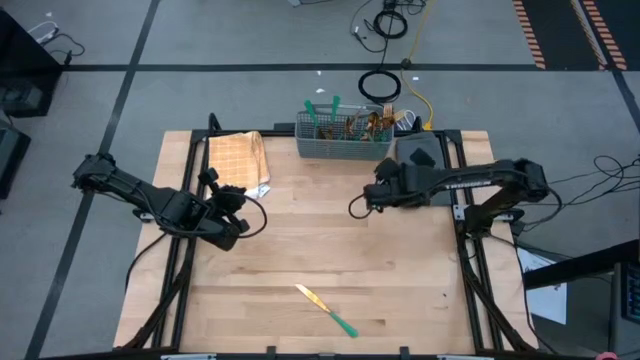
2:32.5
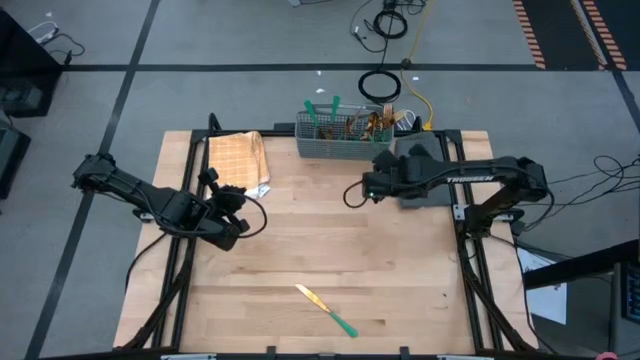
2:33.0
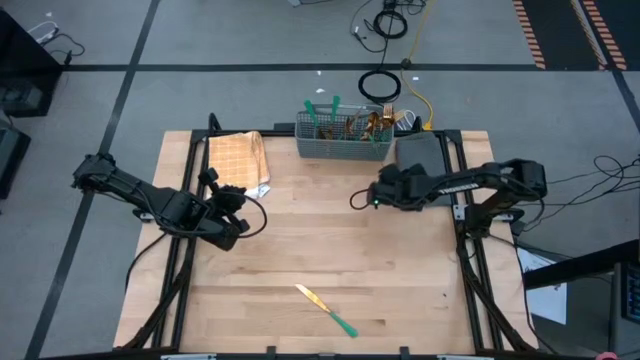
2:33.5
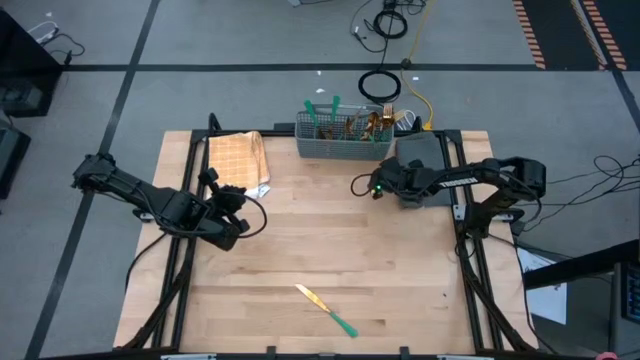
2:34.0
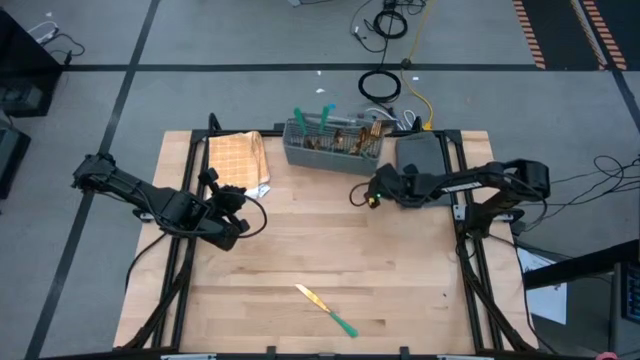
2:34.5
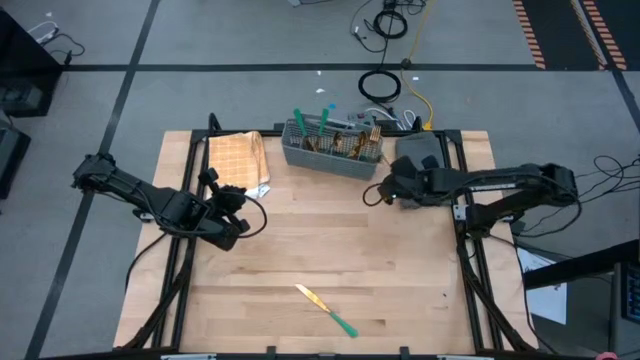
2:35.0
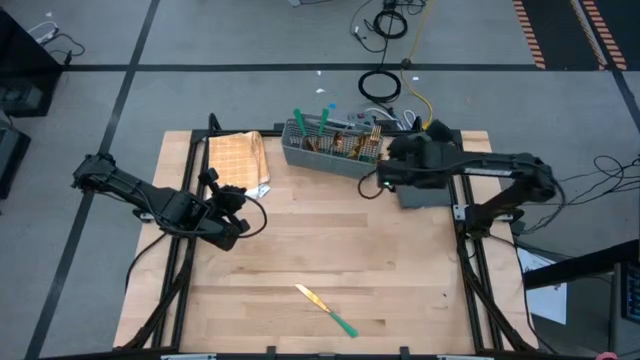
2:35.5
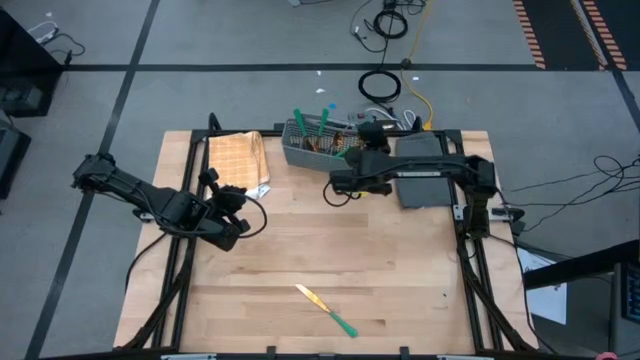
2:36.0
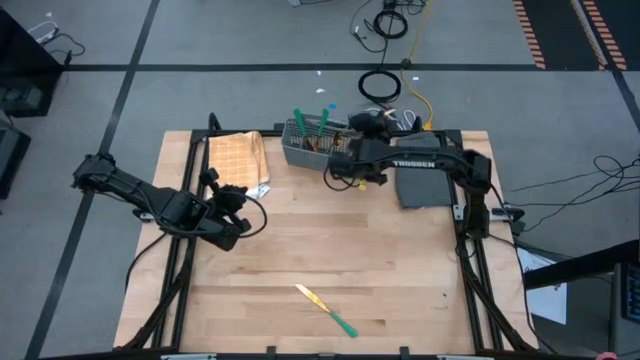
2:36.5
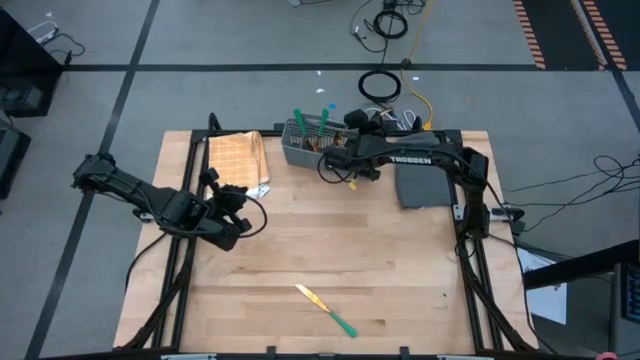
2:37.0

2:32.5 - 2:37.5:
Task: Sort silverware
Put the spoon into the middle right section of the dish rack

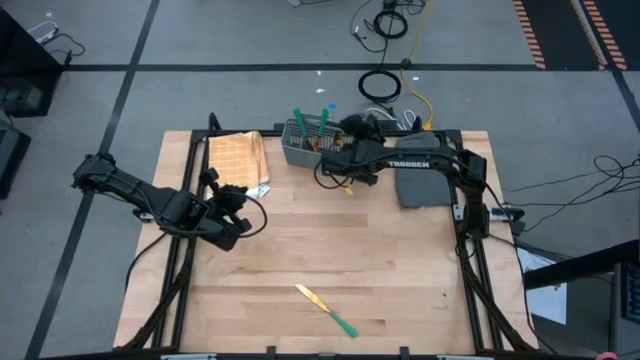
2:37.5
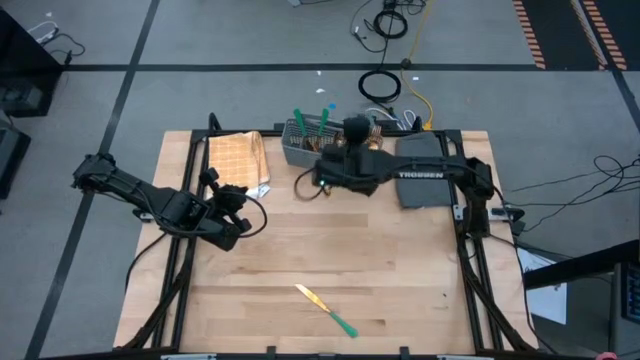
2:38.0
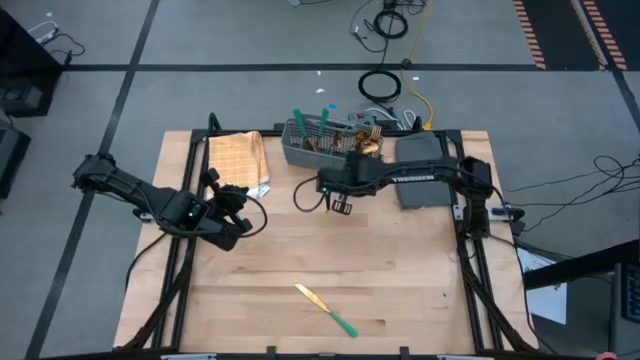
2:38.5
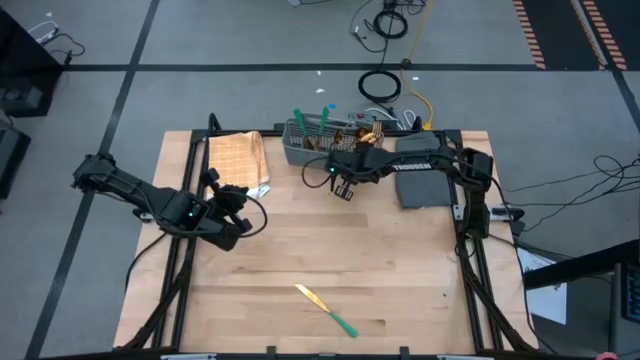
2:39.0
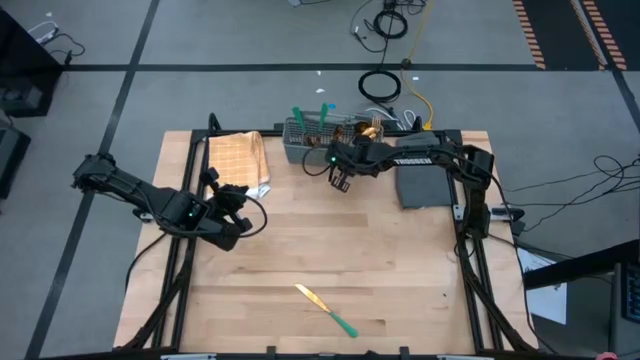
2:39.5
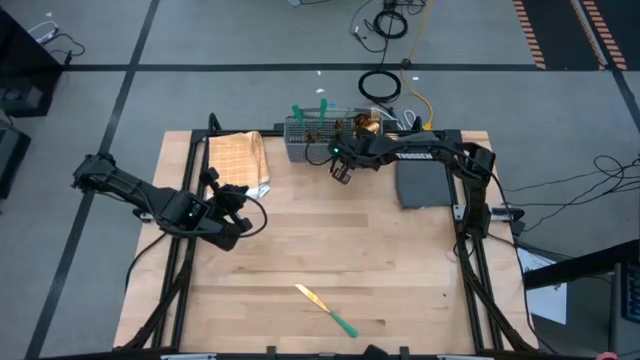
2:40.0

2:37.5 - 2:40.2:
Adjust the dish rack

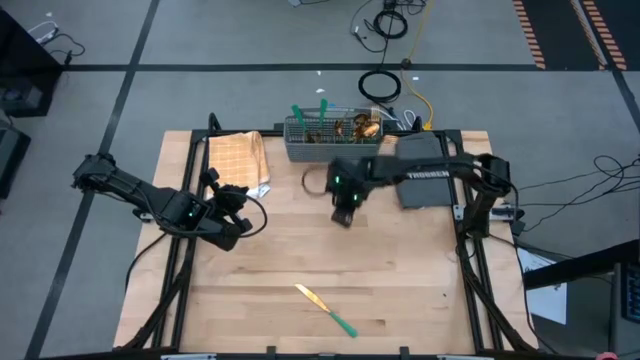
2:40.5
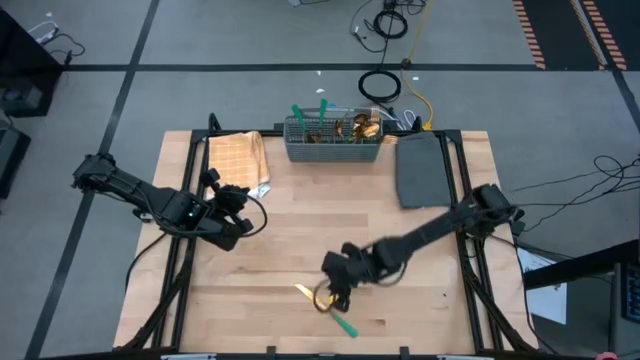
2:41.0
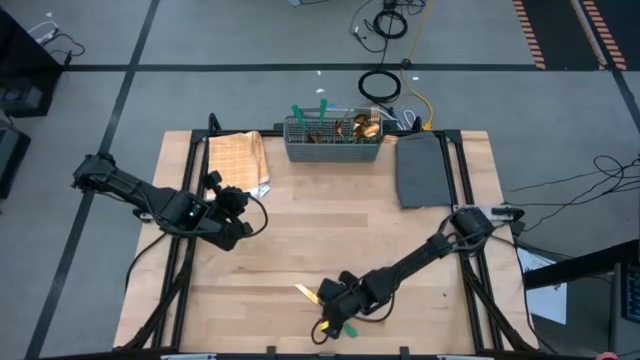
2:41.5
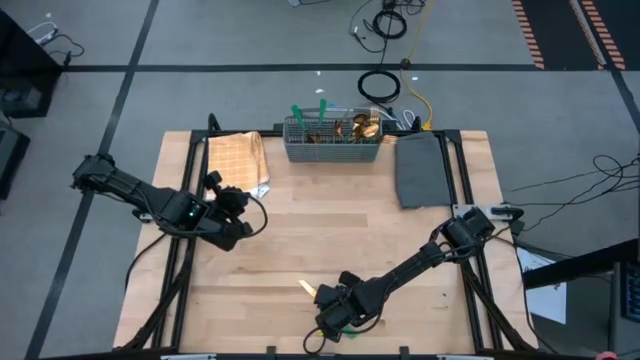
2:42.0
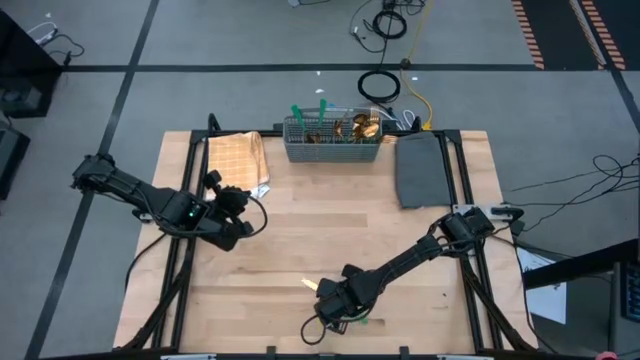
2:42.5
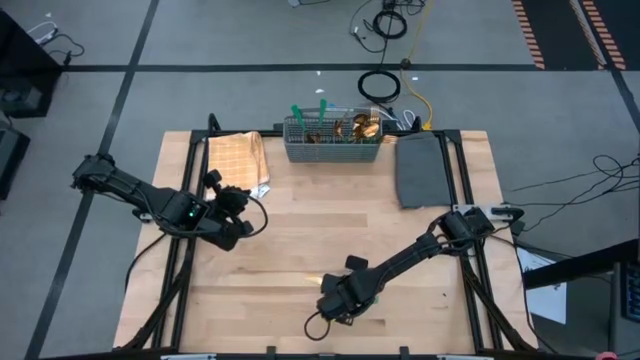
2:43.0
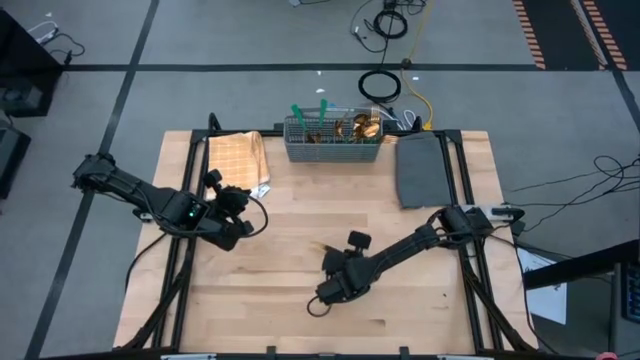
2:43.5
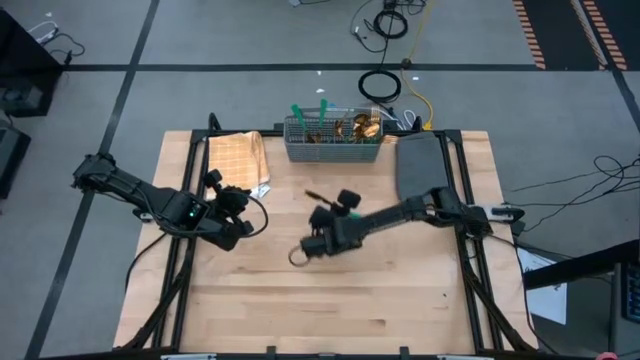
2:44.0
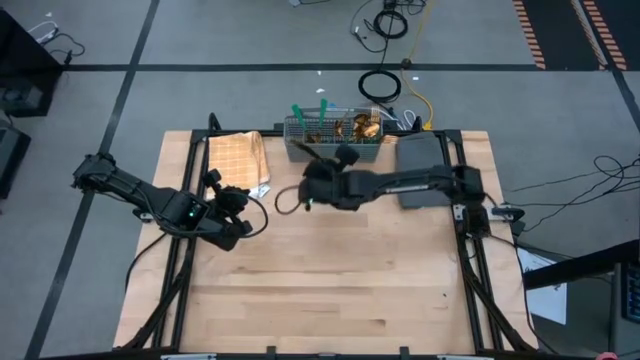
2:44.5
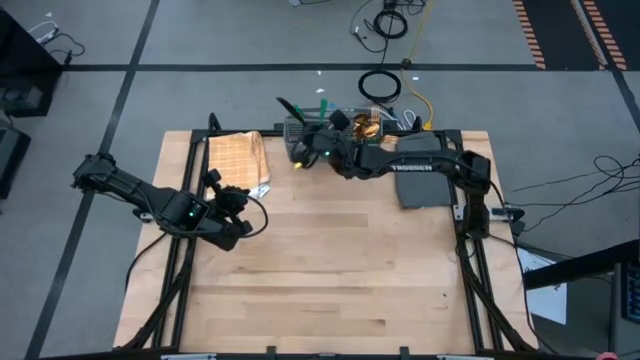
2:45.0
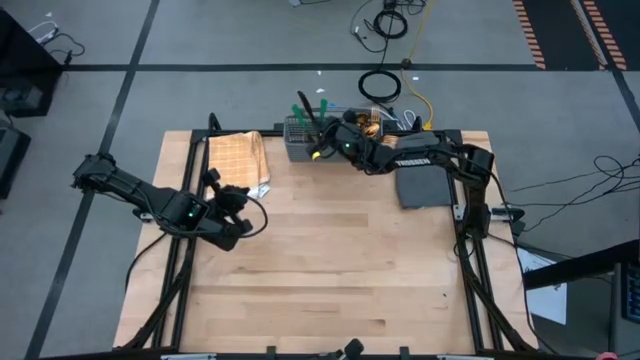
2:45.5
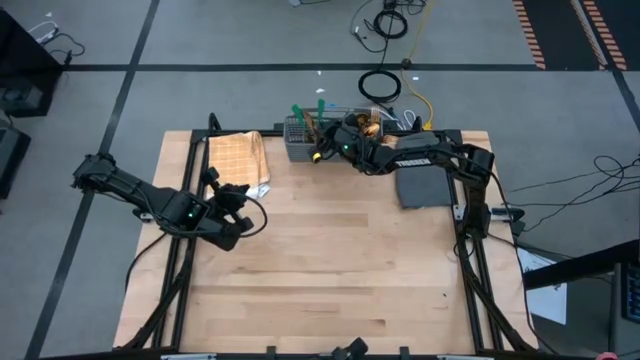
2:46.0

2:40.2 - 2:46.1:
Put the knife into the middle left section of the dish rack

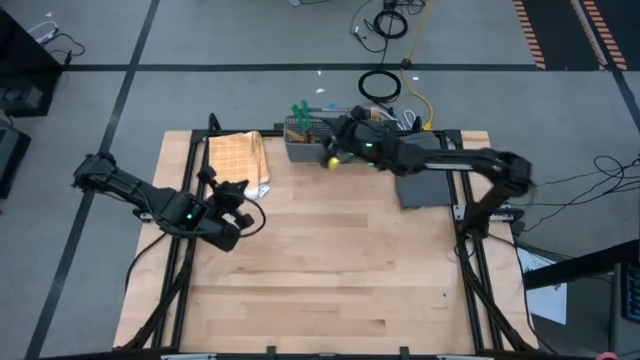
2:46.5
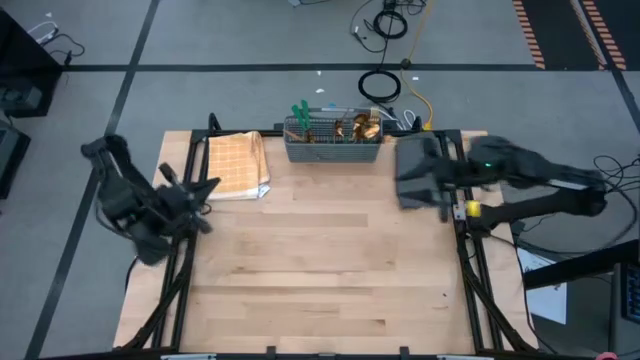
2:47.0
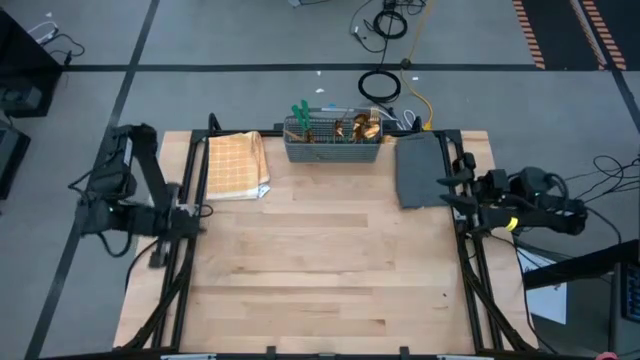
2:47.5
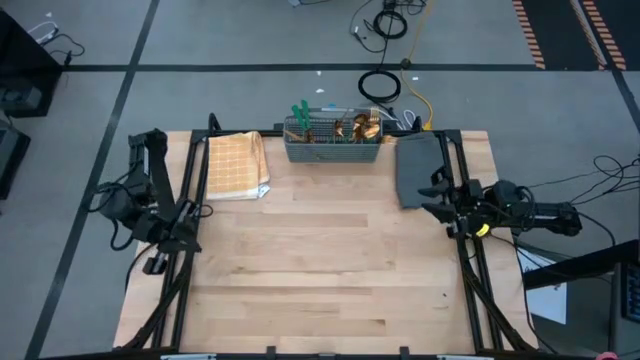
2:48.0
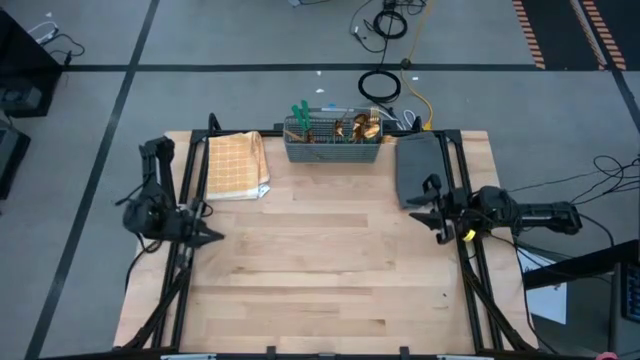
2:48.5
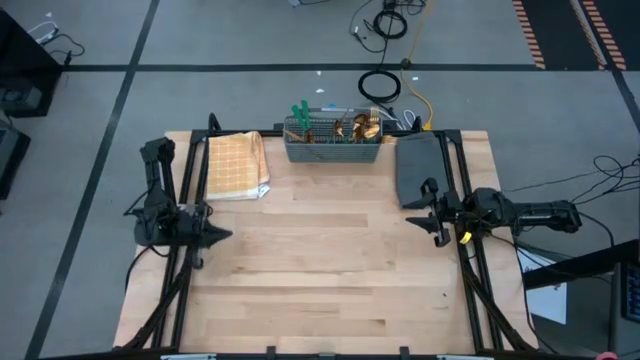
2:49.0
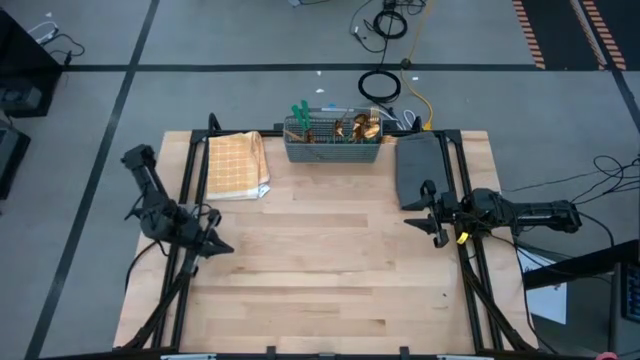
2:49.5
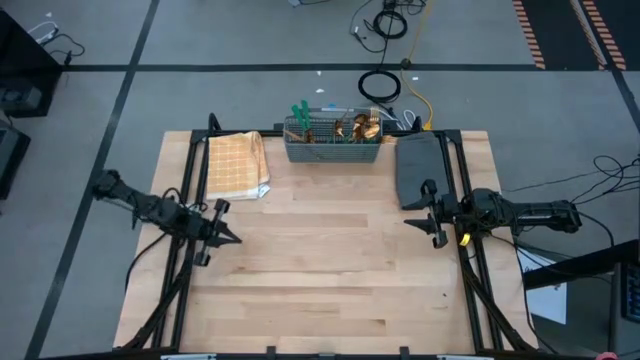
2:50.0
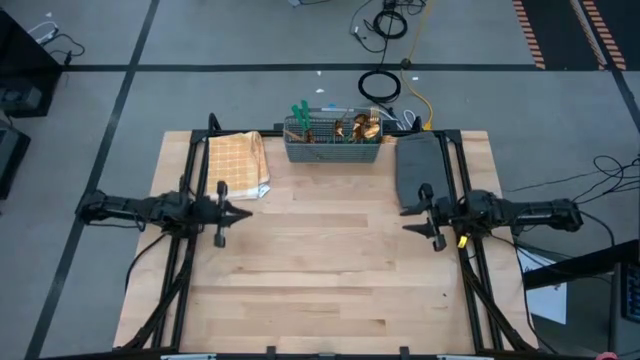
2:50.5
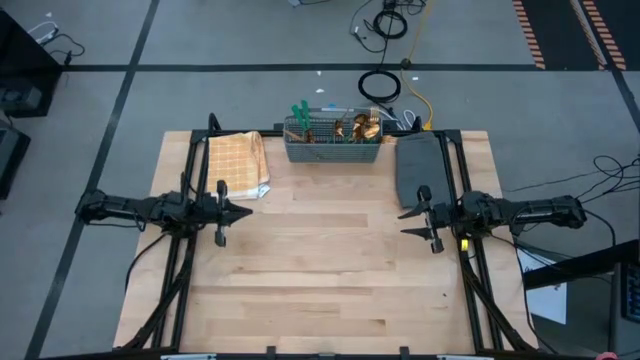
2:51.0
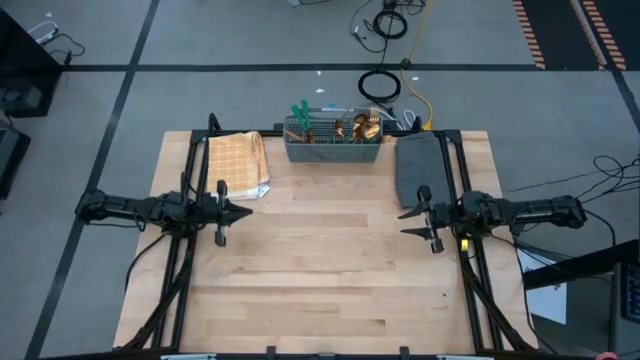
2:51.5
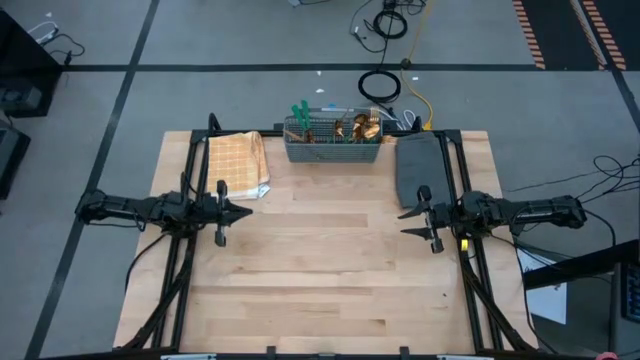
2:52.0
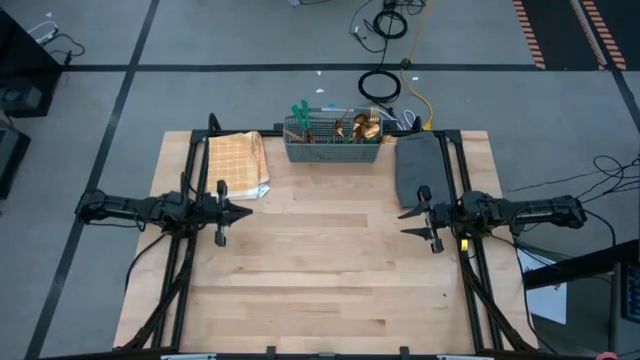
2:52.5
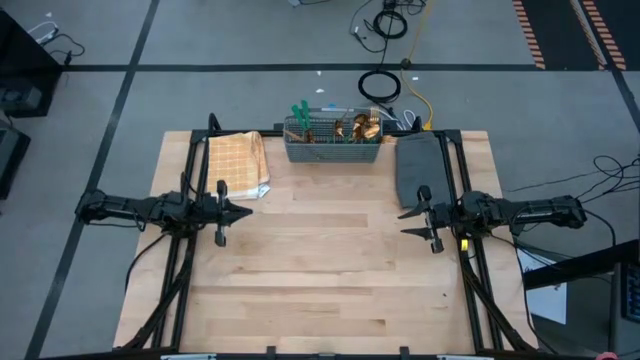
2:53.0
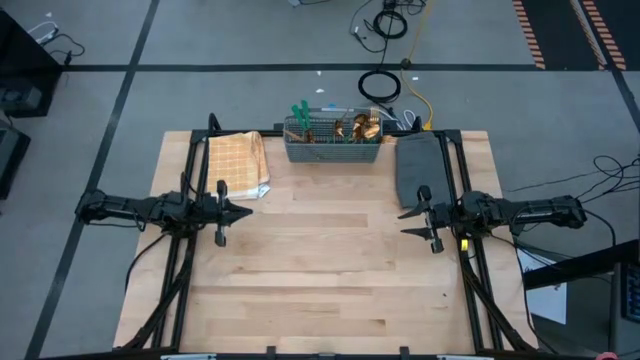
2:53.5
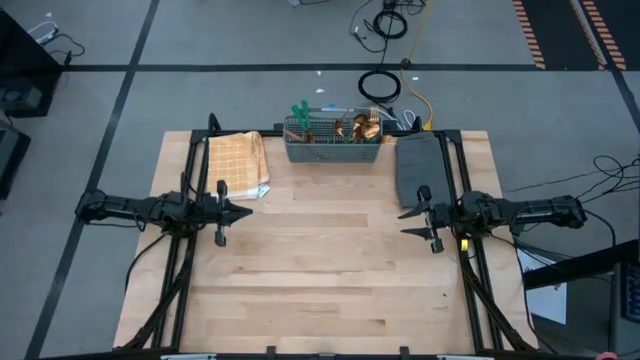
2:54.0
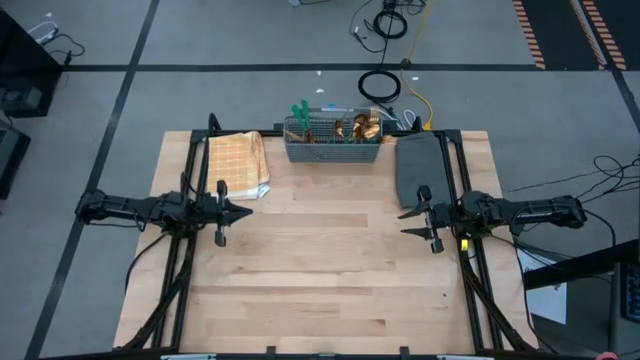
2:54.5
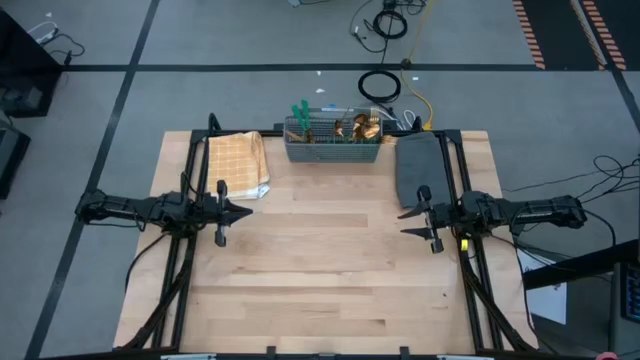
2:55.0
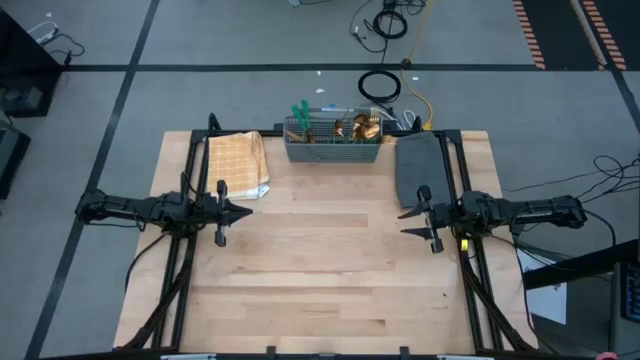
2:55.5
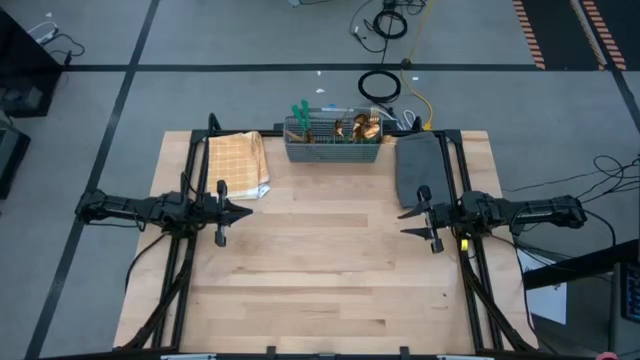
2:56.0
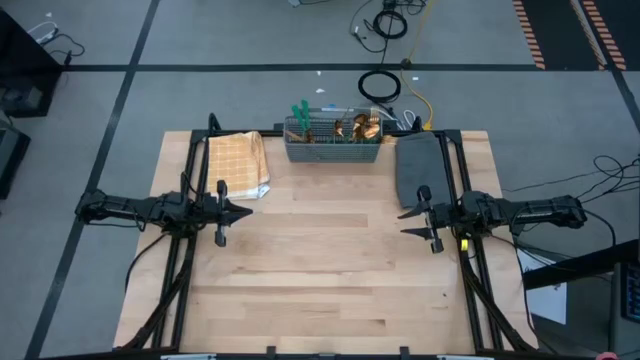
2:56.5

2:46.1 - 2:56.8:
Return to Home Position
